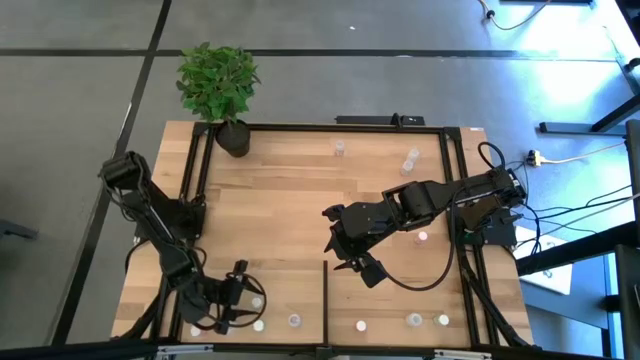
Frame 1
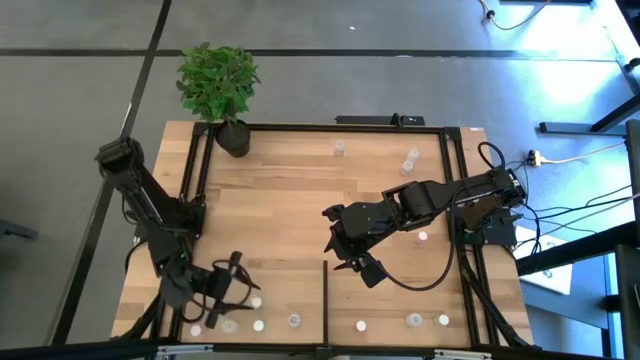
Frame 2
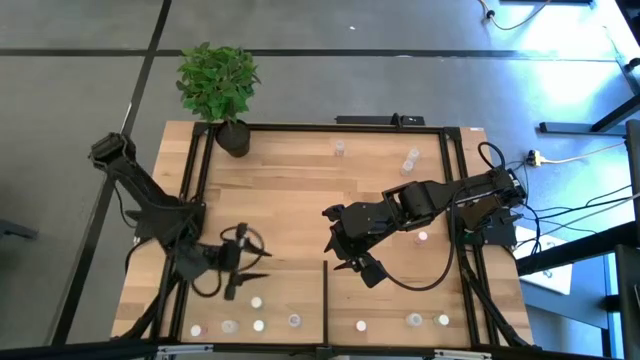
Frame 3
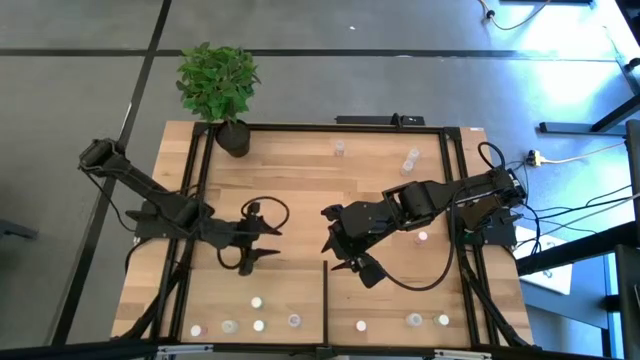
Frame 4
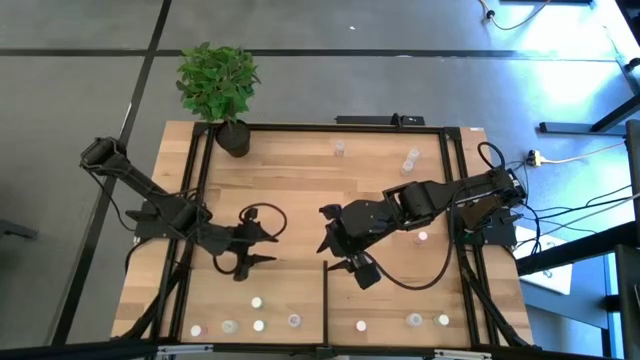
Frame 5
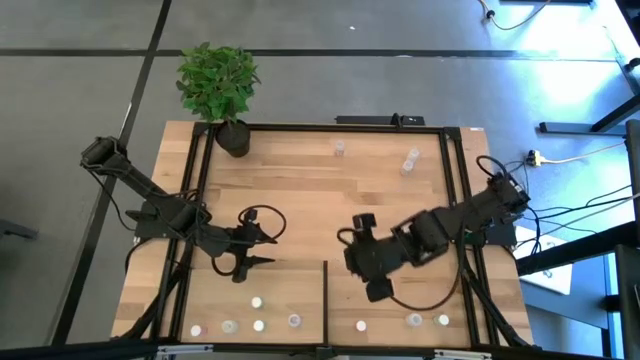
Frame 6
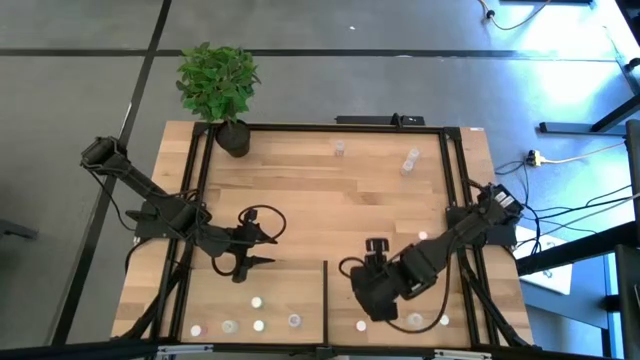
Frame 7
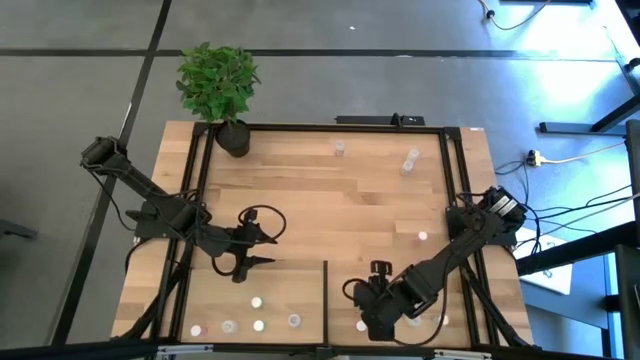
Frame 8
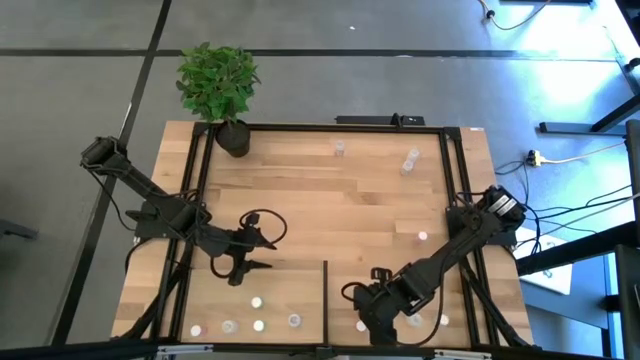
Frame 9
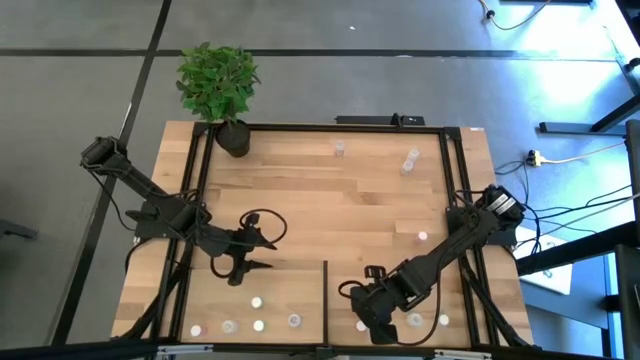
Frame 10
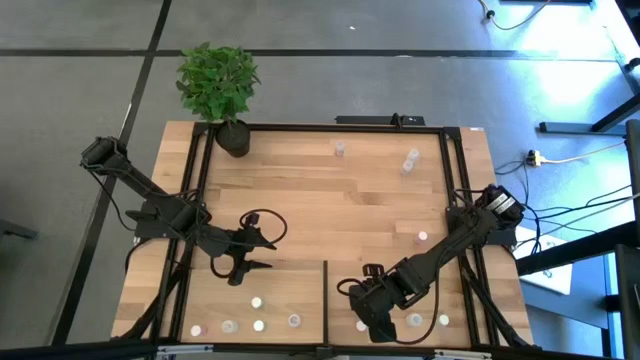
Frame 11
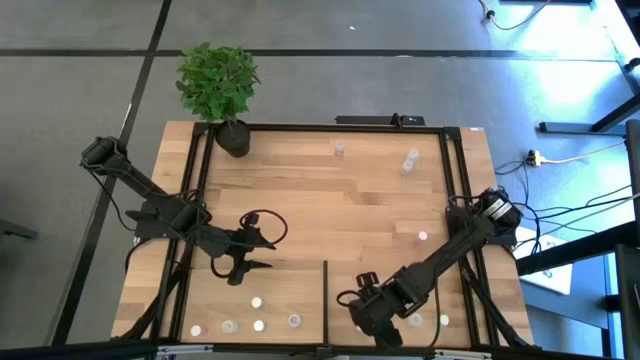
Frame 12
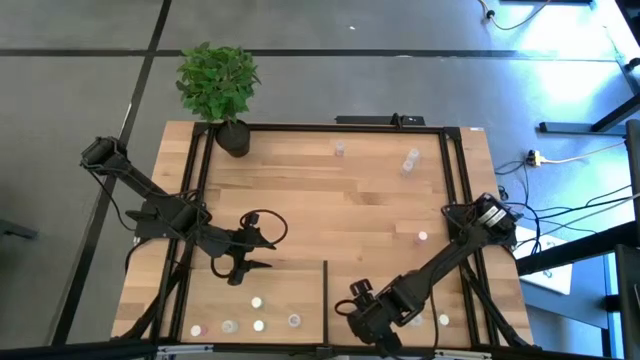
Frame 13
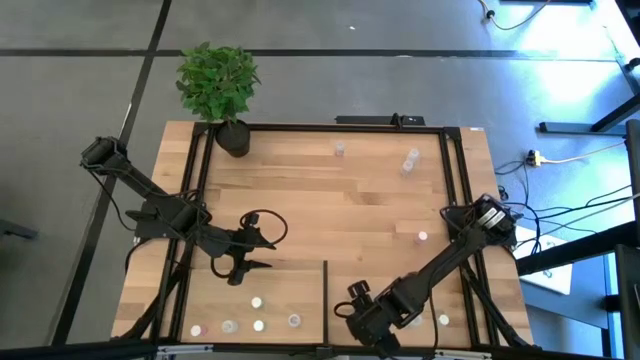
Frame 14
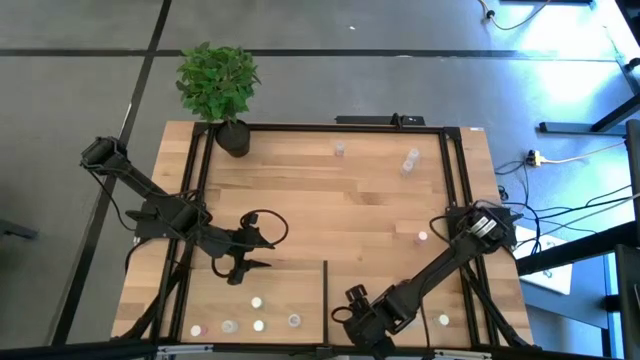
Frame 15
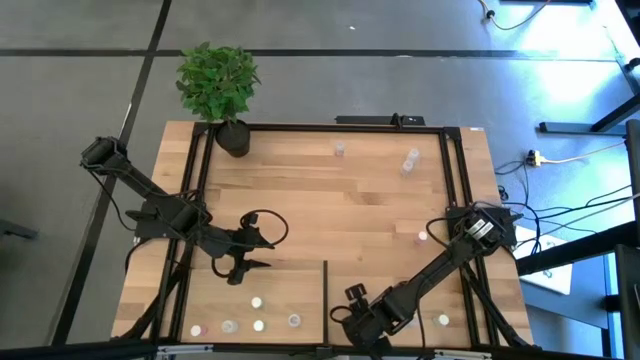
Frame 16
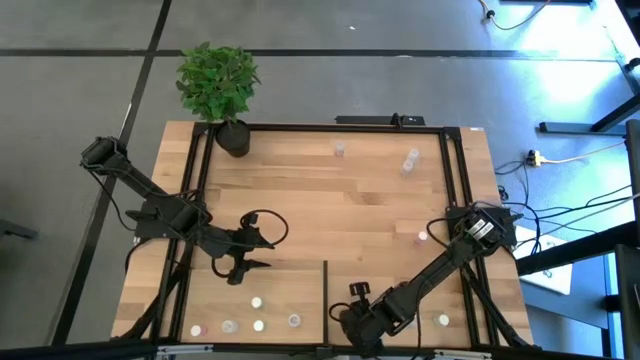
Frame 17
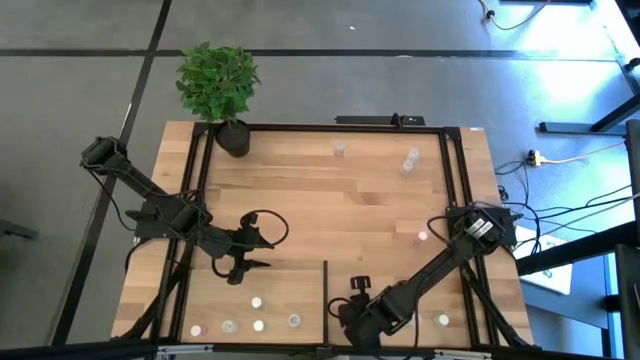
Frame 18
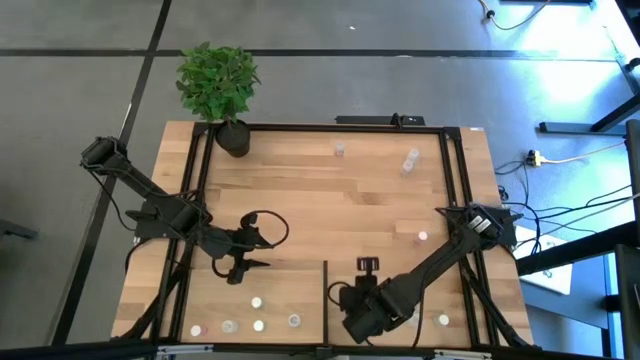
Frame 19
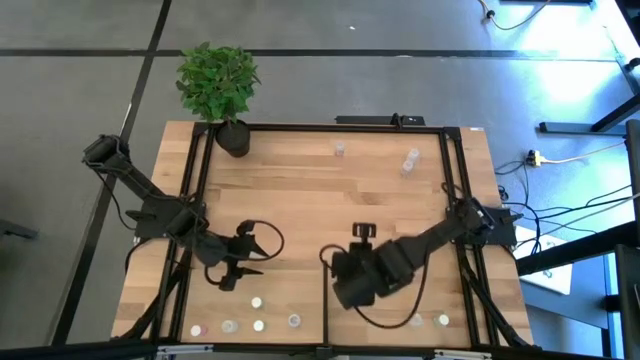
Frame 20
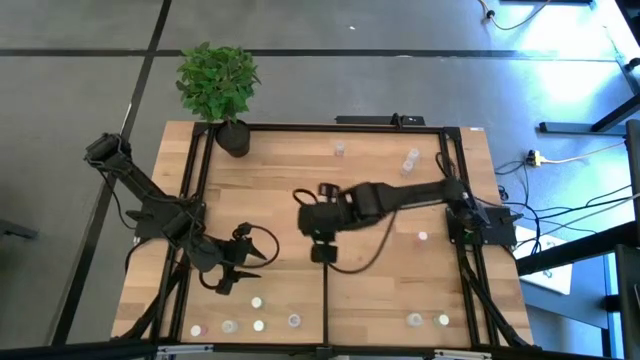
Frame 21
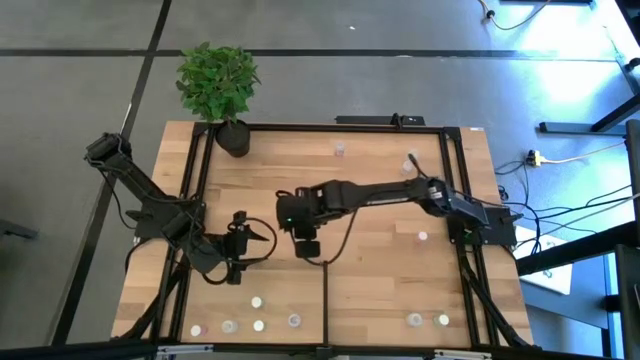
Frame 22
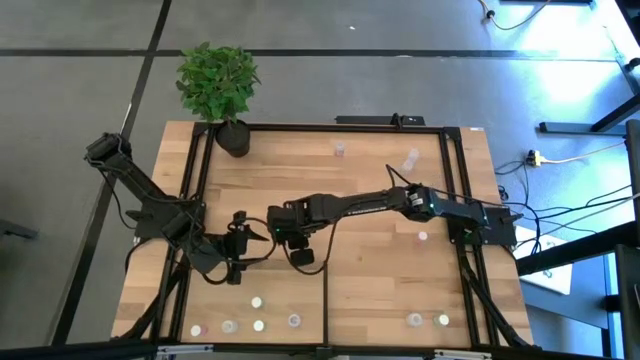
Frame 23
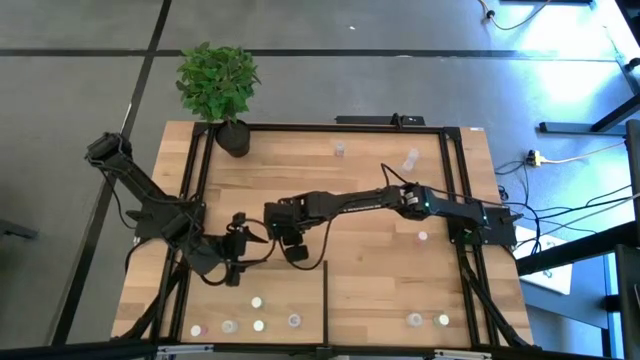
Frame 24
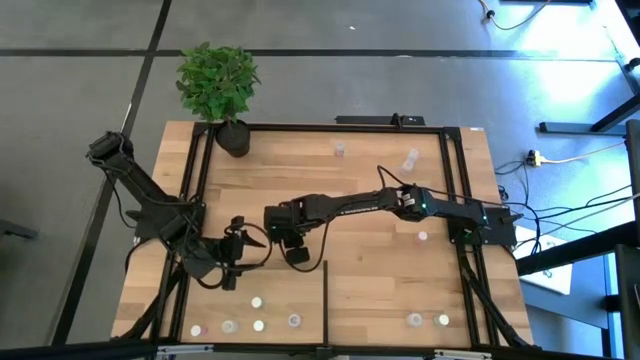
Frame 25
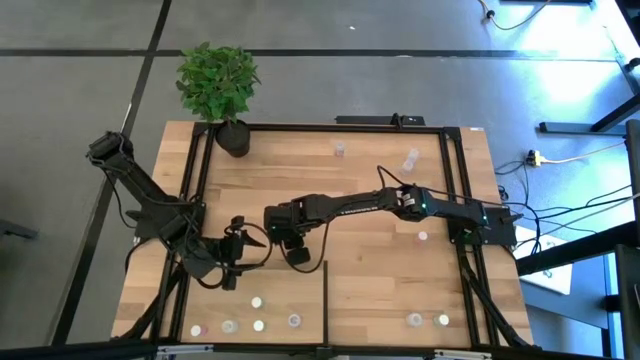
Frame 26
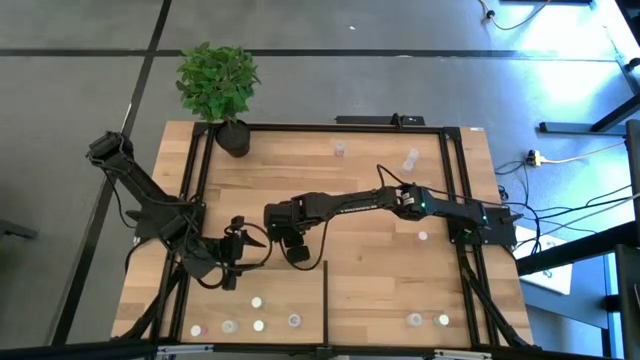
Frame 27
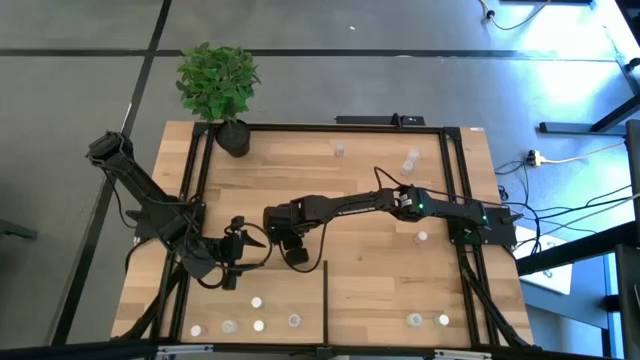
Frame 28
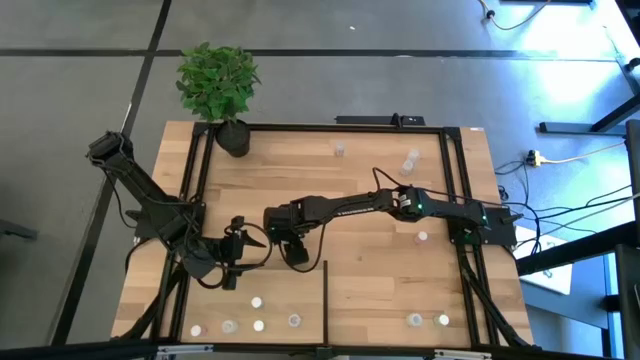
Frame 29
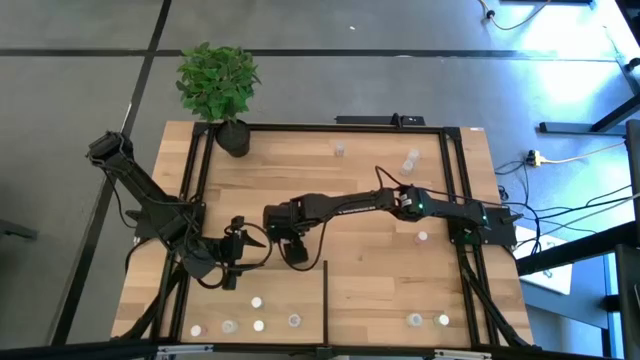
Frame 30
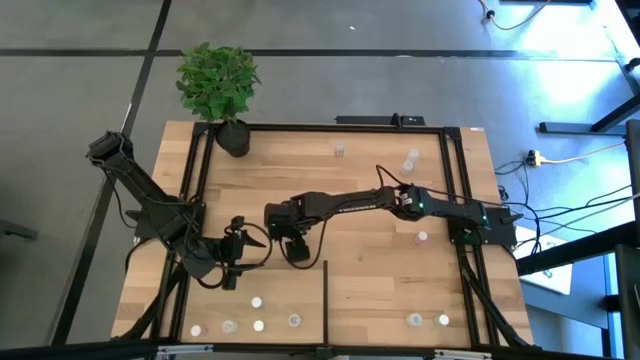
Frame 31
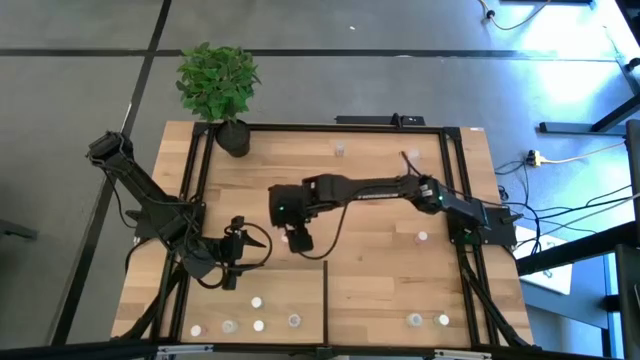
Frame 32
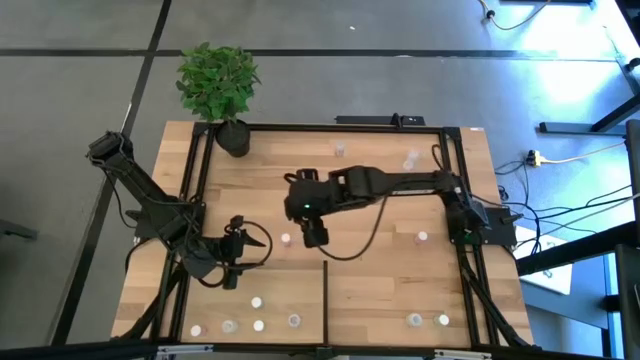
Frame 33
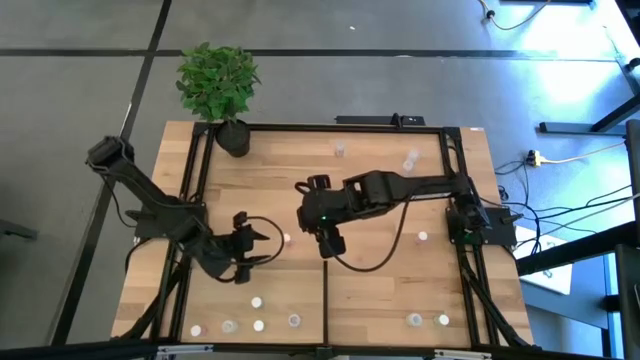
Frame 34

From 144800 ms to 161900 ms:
Task: Pick and place medicine bottles onto shelf by color
Put the bottom pink pill bottle on the shelf aligned with the other pink pill bottle

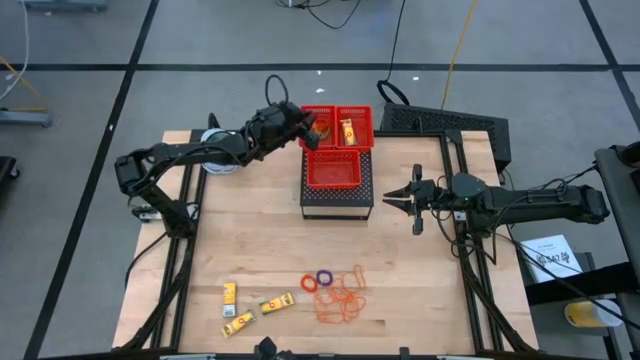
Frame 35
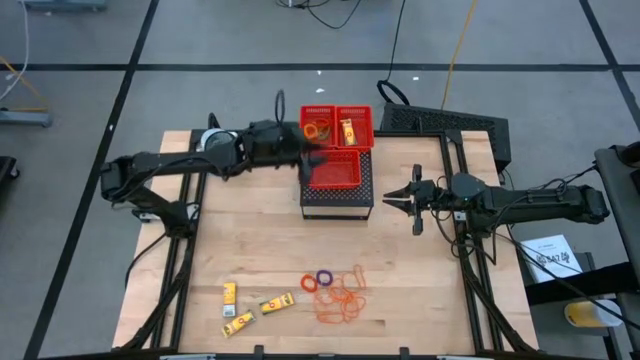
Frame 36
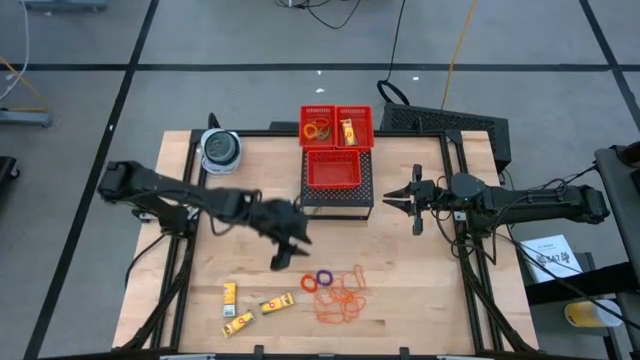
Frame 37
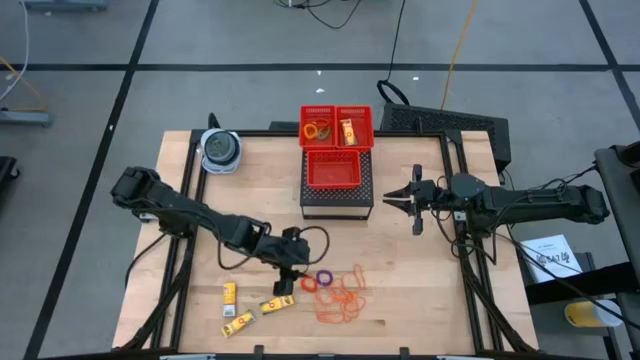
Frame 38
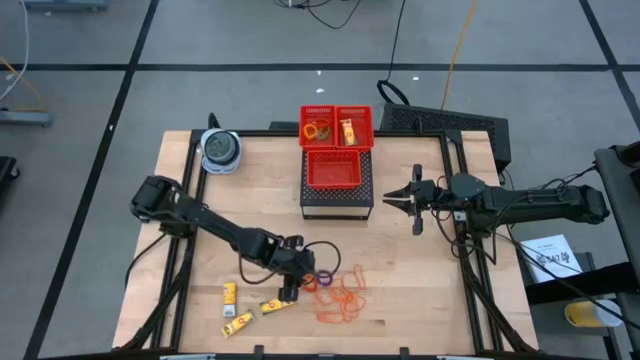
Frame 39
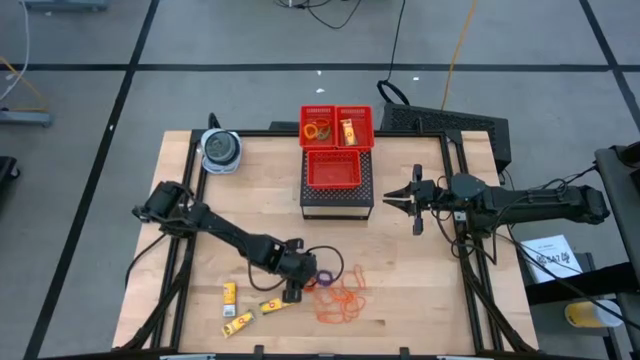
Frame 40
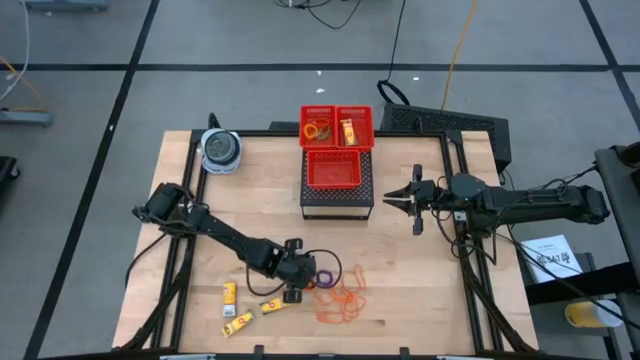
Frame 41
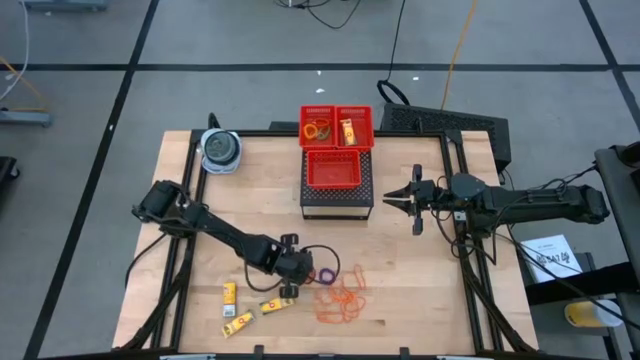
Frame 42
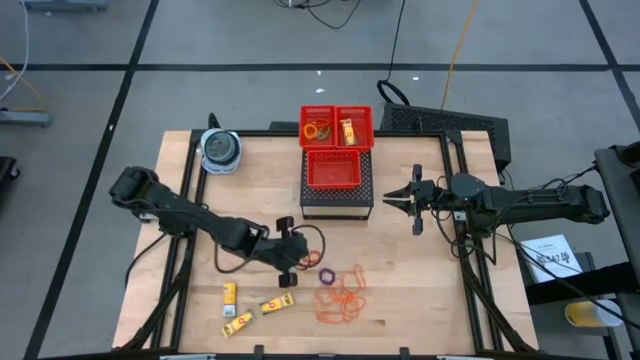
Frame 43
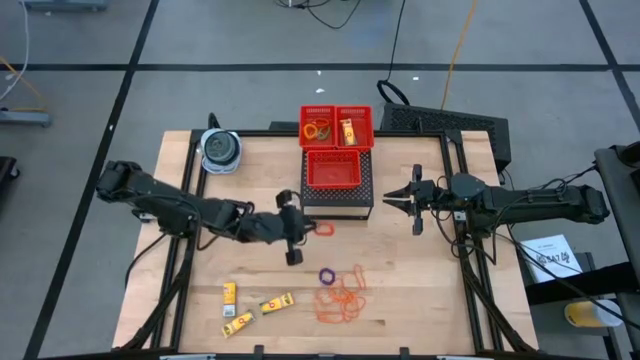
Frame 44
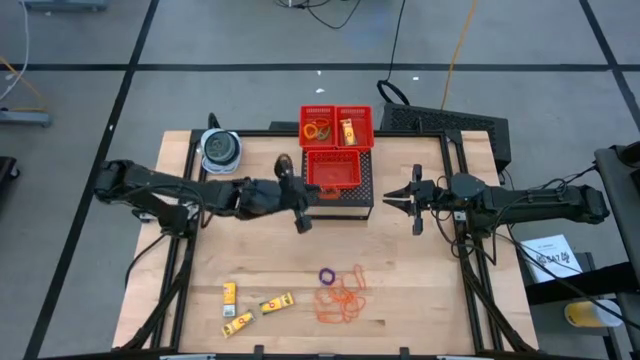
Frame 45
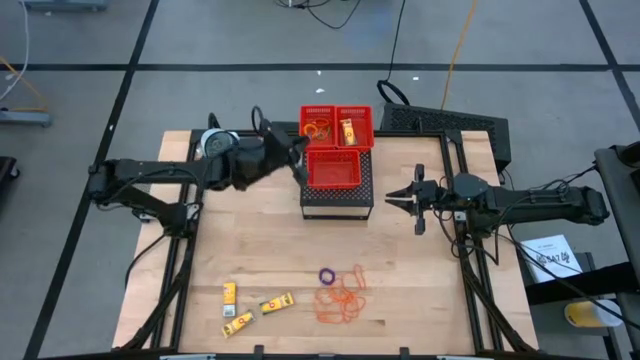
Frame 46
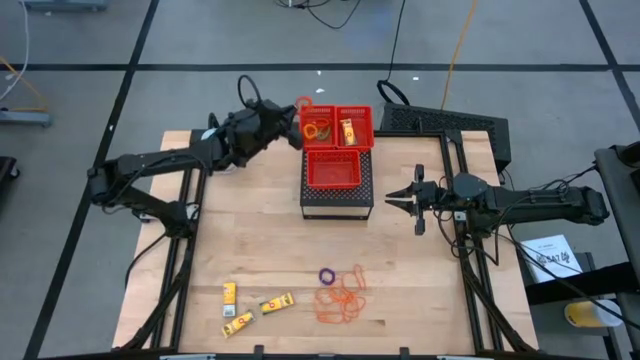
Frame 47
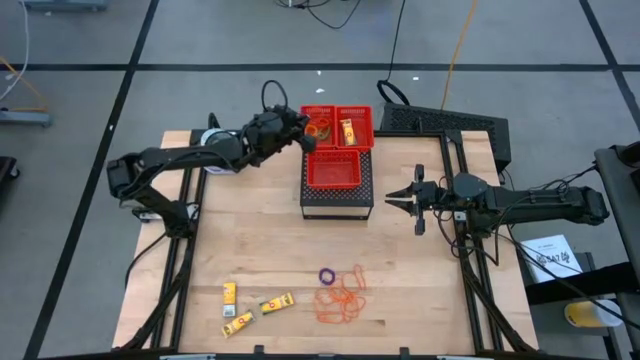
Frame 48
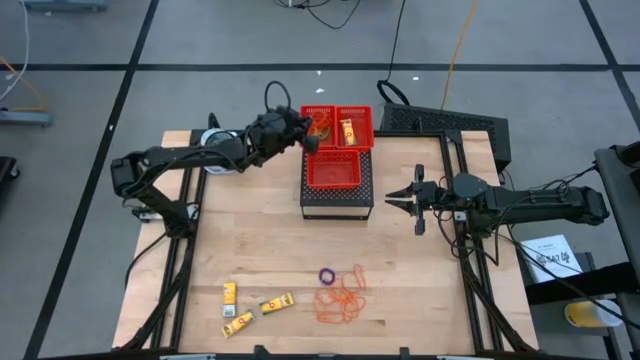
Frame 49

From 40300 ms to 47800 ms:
Task: Pick & Place Office Desk Supplies
Put the orange spring keychain in the top left red bin on the shelf
